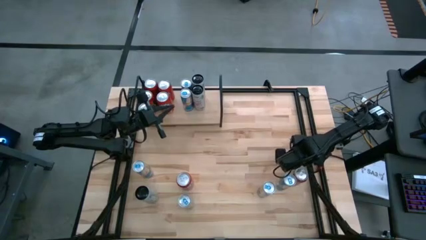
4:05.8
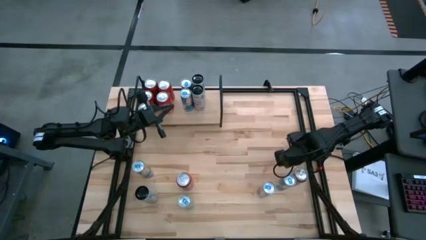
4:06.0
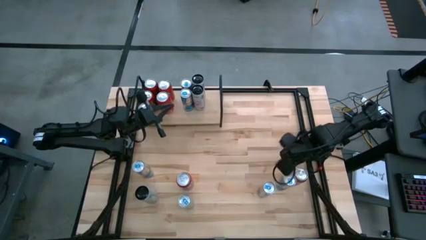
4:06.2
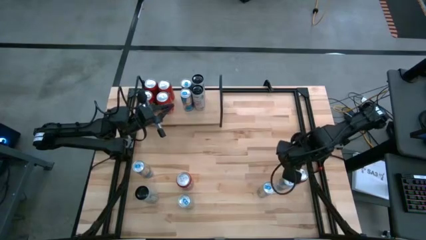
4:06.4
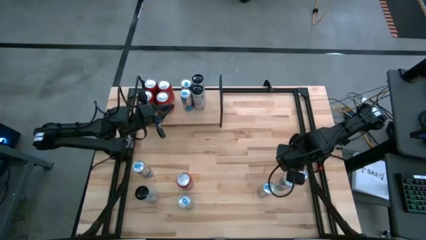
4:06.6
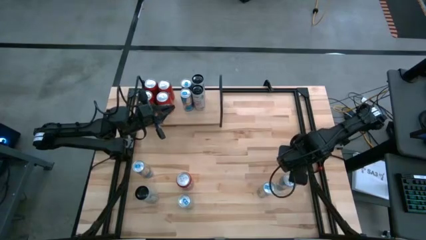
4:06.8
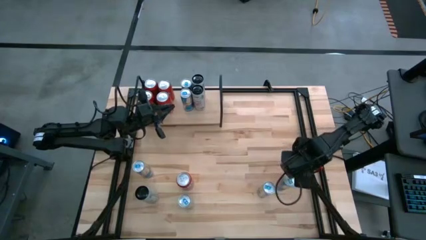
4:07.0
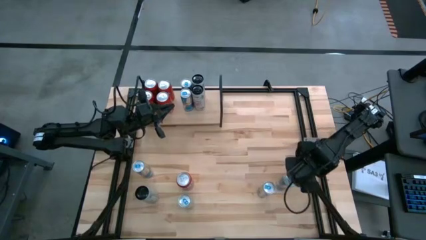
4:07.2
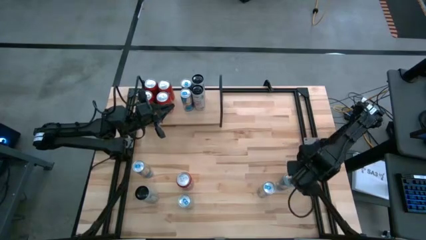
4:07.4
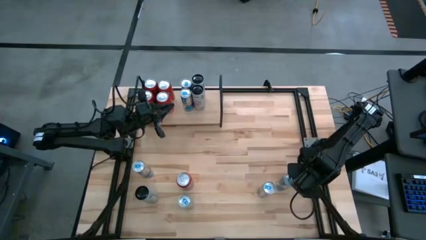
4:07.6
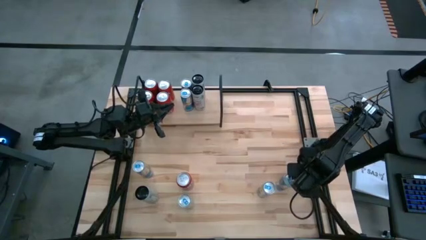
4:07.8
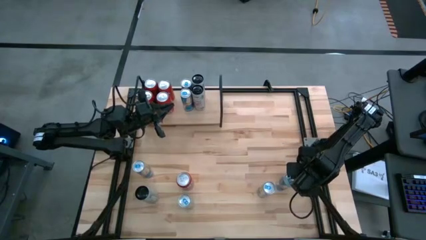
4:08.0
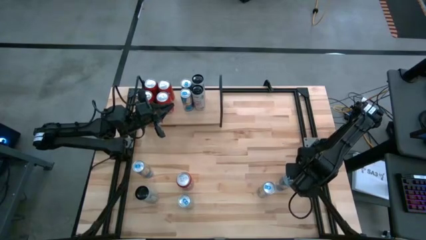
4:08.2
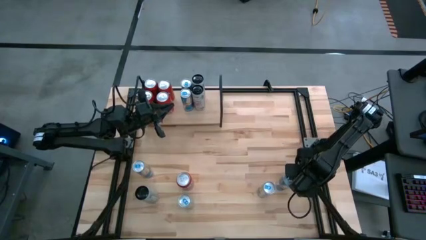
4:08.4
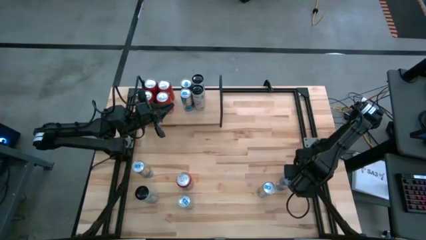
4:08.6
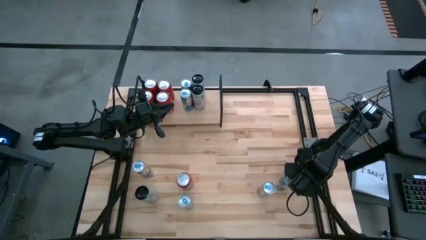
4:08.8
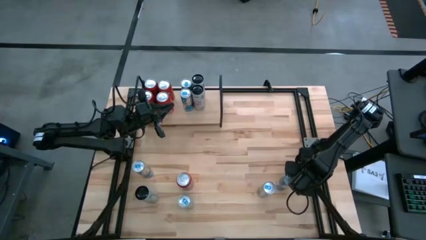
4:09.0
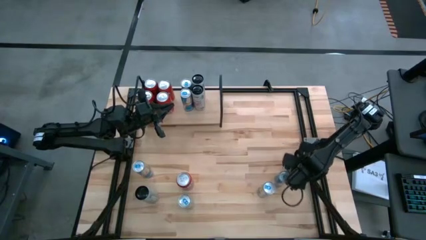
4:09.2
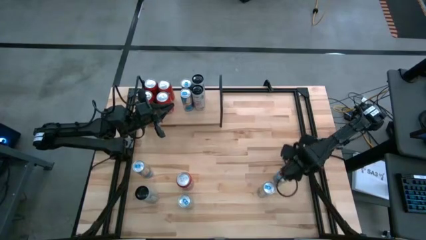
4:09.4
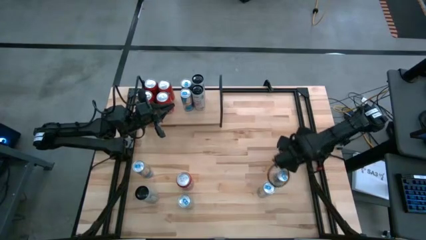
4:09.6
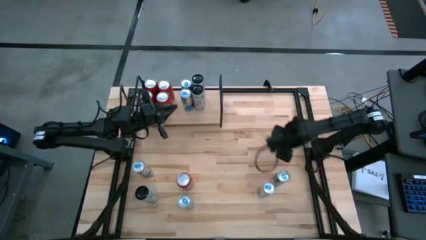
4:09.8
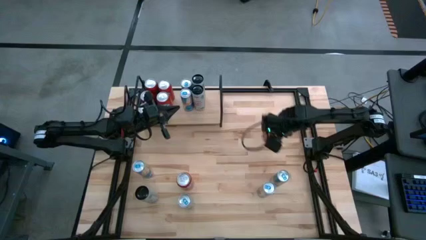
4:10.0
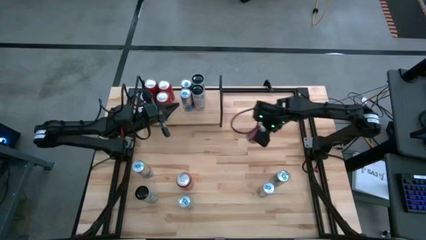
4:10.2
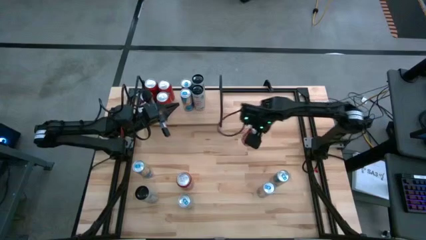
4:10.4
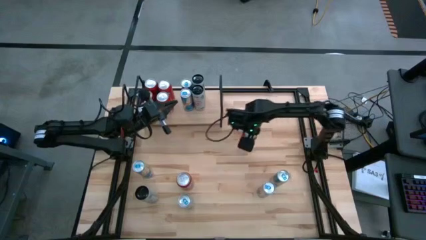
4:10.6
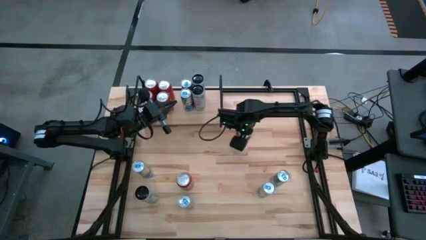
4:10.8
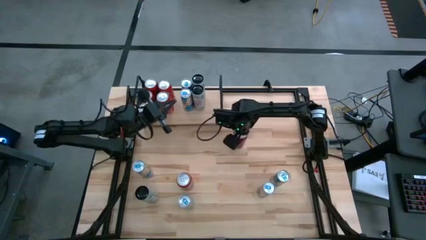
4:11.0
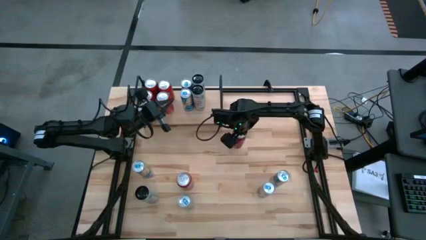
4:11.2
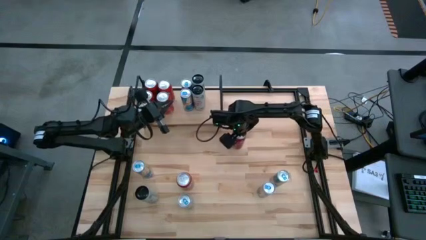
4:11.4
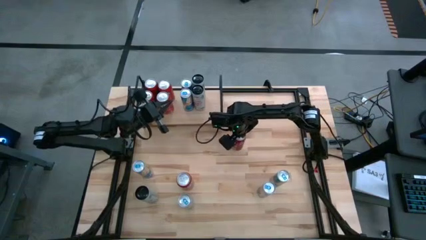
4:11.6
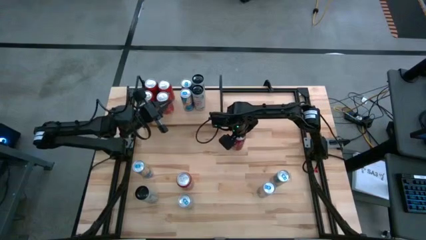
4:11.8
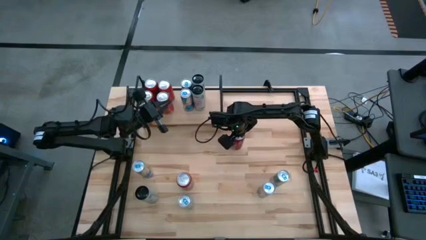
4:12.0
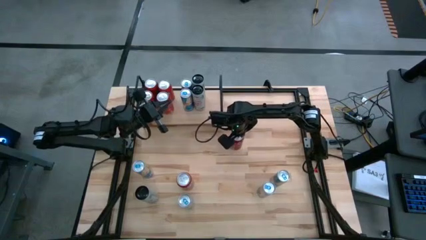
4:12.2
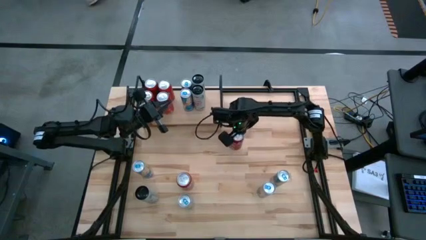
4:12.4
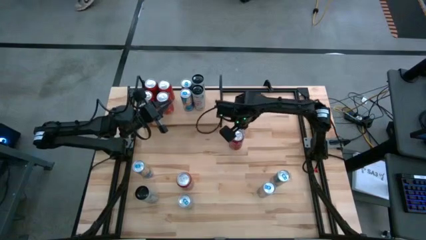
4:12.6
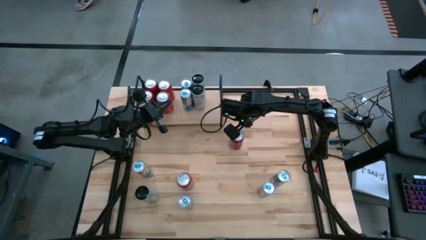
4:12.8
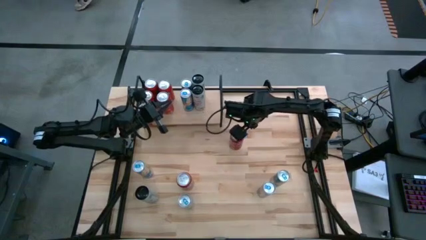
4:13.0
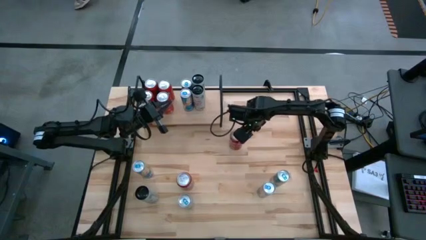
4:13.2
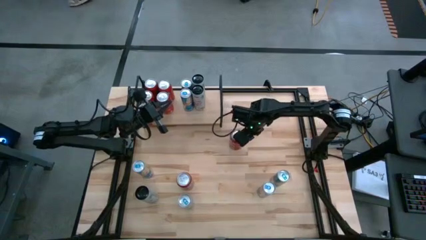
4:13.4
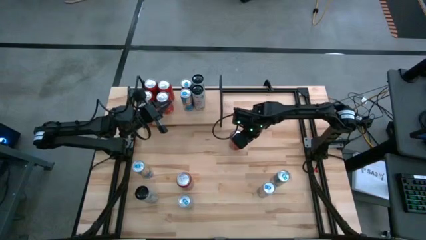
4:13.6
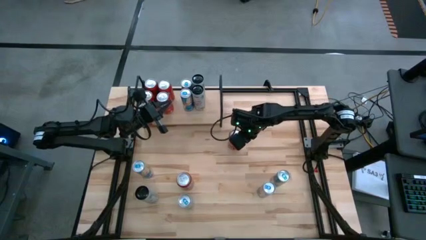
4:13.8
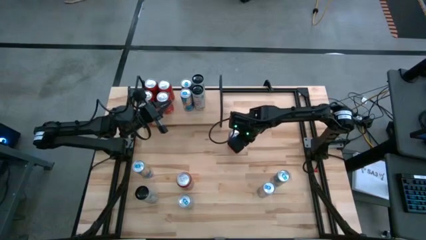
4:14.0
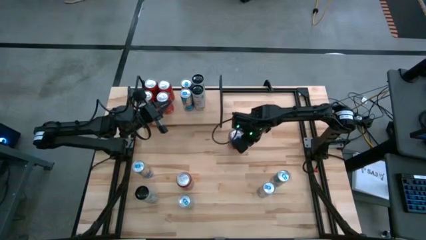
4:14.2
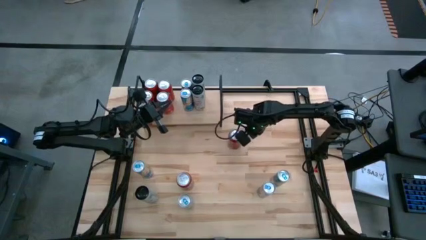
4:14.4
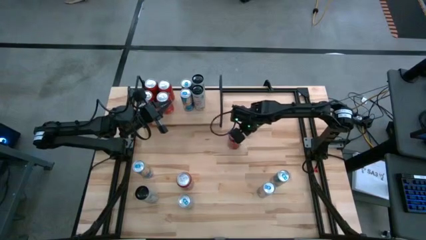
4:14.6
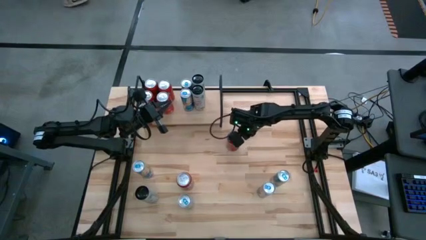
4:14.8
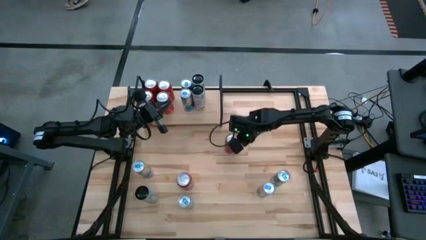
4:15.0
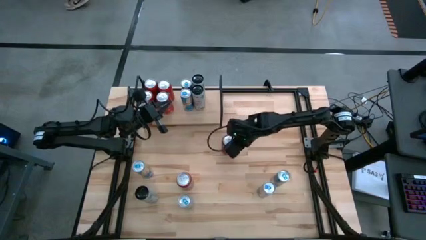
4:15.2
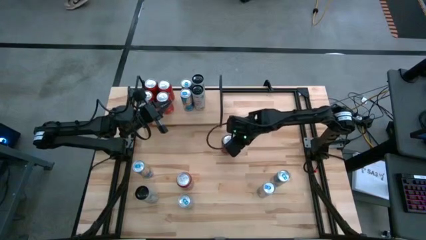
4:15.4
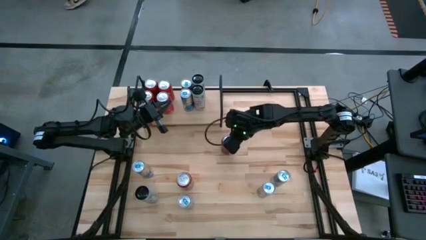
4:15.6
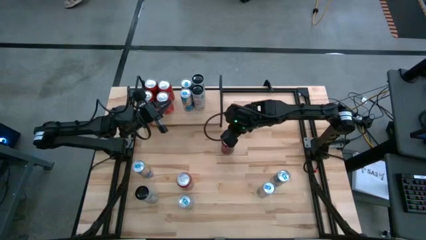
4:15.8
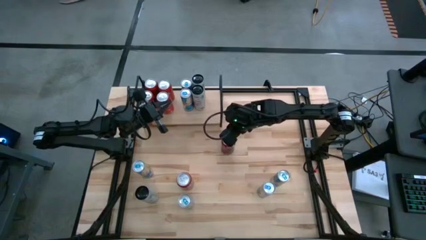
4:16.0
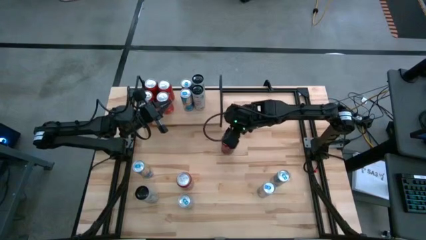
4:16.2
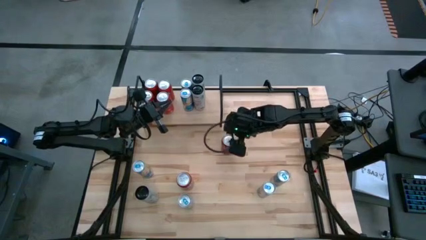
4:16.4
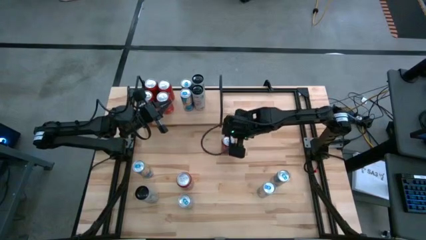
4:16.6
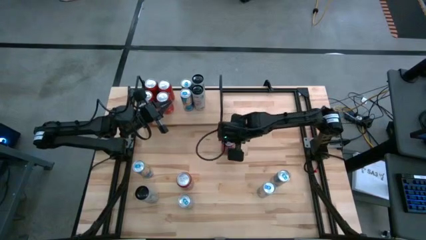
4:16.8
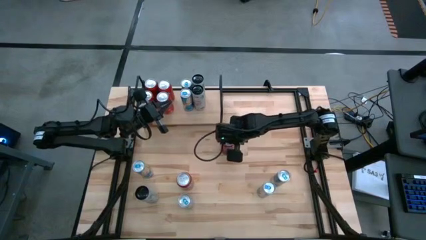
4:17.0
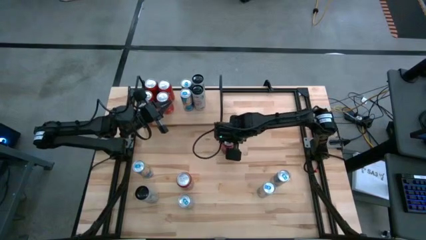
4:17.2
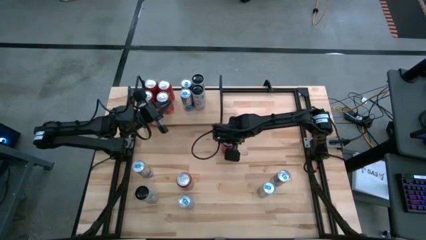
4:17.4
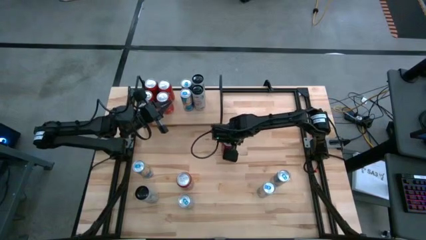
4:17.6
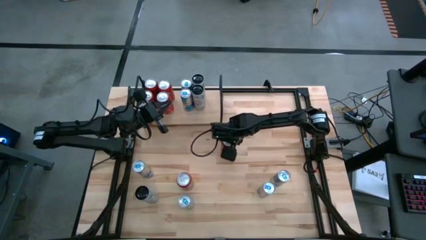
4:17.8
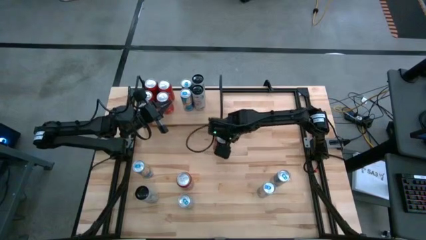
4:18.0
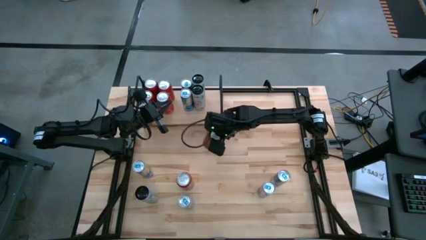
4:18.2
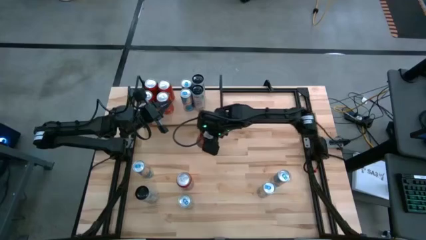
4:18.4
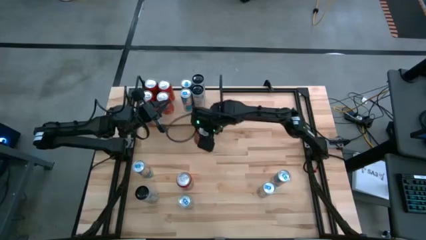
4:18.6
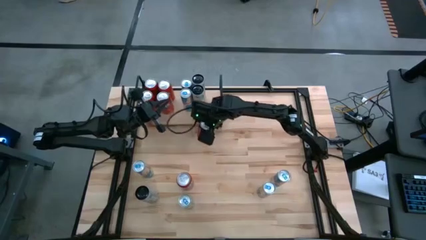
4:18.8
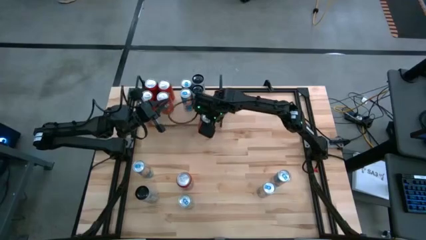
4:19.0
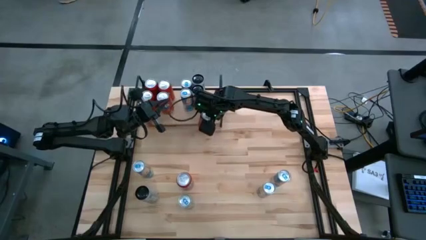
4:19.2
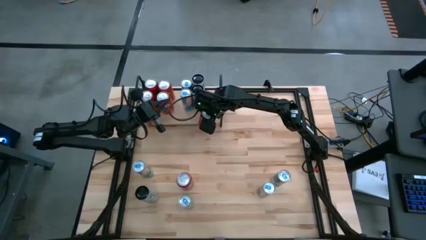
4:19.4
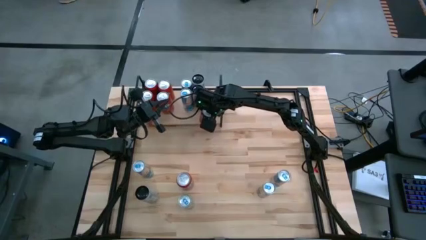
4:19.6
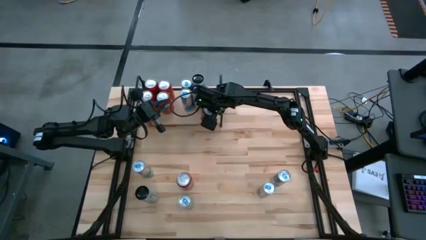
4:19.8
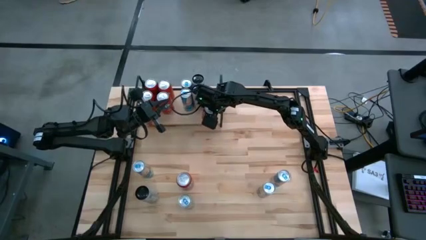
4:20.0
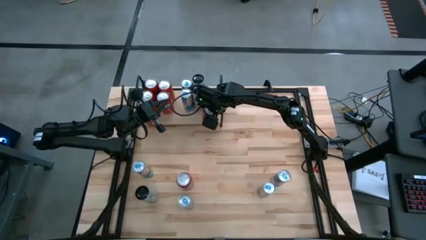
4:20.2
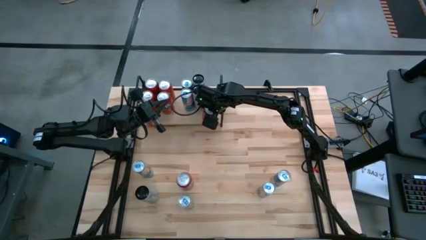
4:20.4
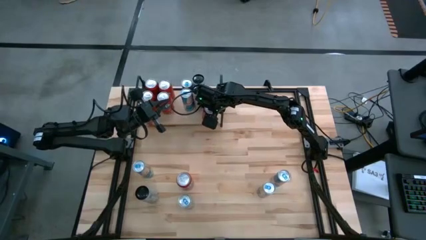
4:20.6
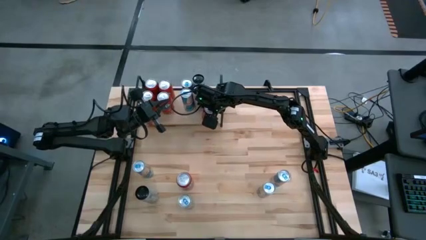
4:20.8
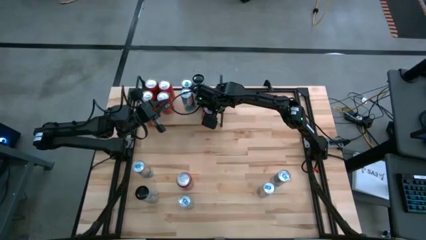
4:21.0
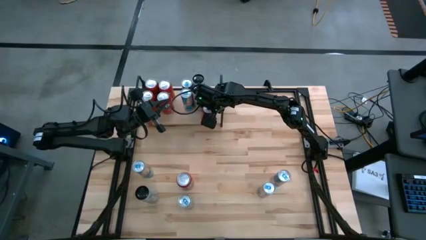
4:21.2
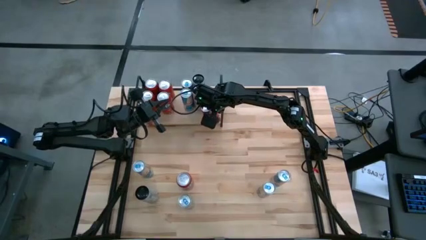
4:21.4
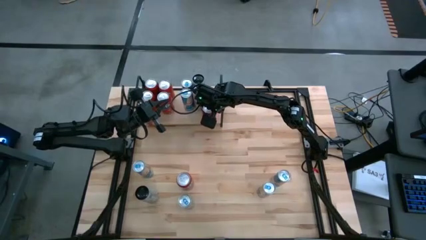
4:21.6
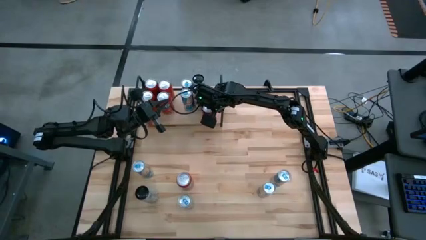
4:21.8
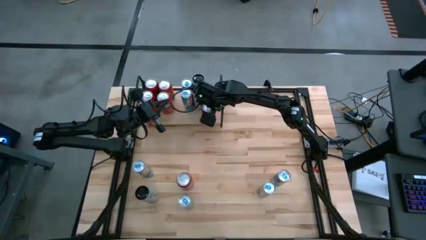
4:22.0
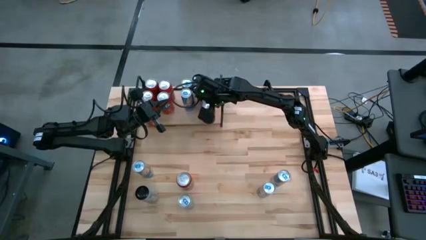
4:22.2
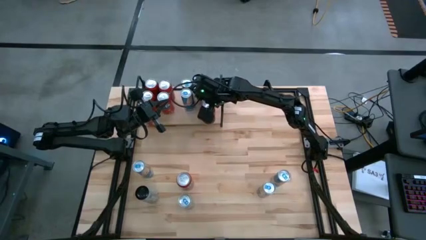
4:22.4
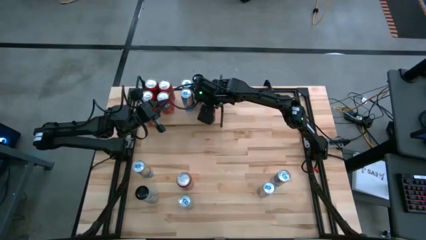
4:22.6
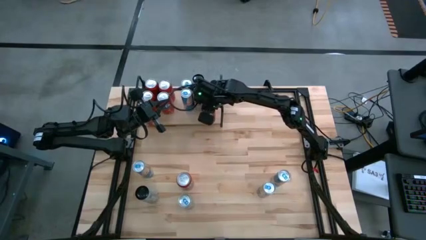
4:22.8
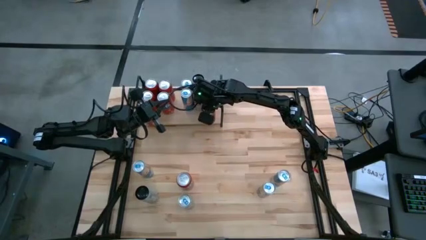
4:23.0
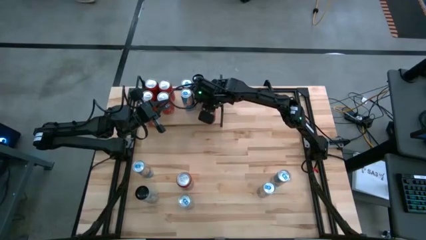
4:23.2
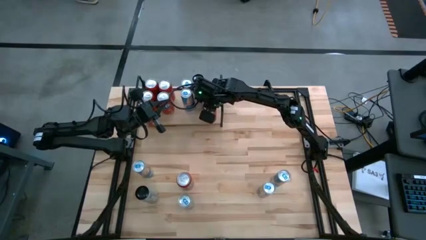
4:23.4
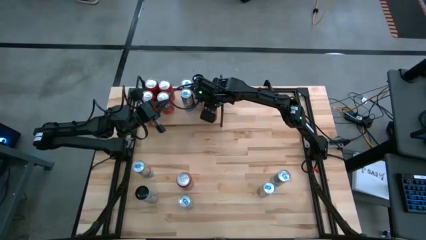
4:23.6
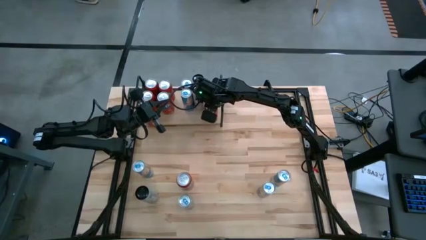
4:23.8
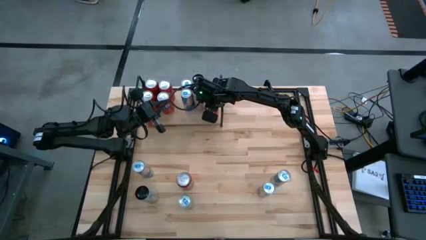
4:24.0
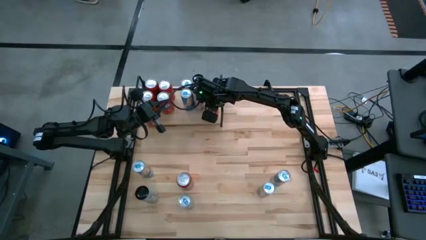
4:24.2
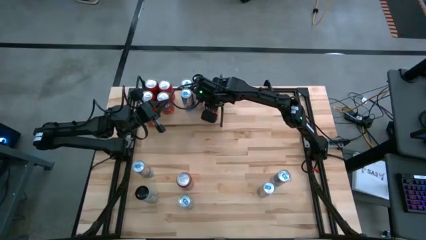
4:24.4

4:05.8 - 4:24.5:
Task: Place canned beverage on shelf
Put the red/white soda can on the shelf
